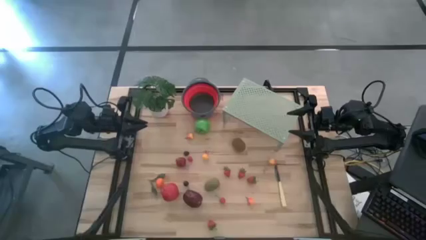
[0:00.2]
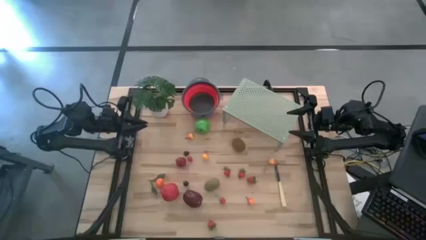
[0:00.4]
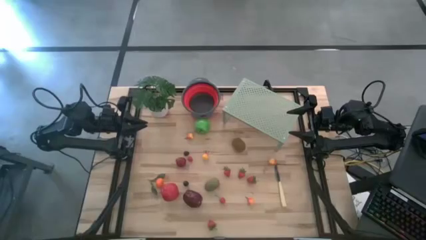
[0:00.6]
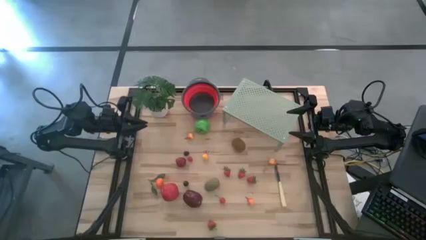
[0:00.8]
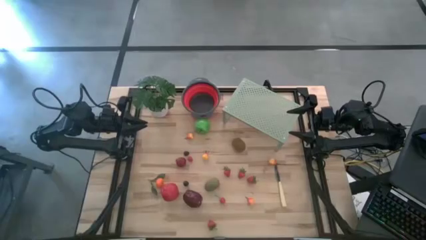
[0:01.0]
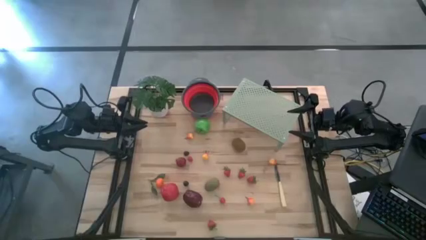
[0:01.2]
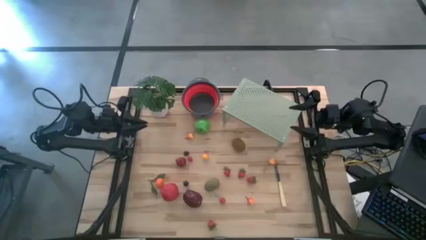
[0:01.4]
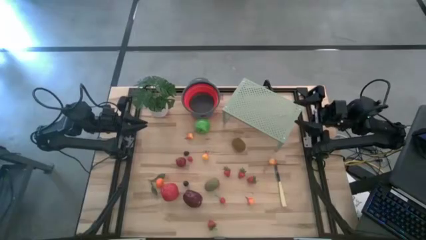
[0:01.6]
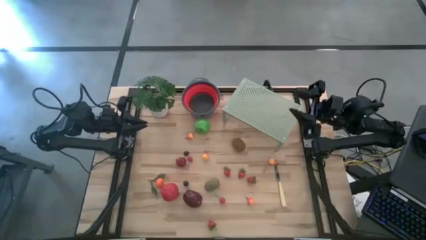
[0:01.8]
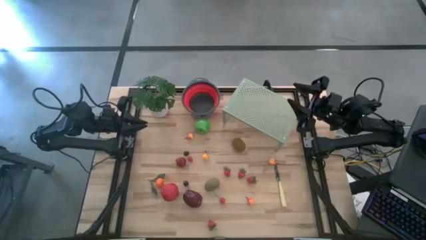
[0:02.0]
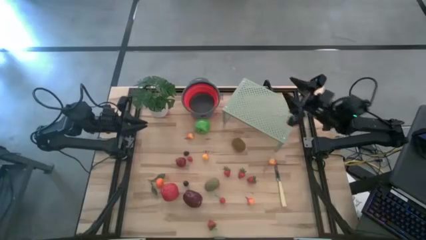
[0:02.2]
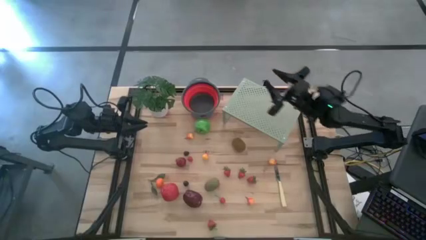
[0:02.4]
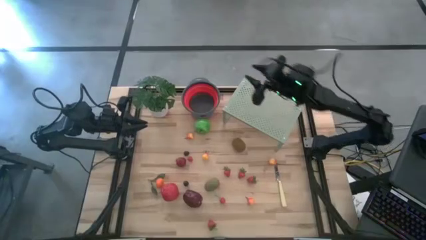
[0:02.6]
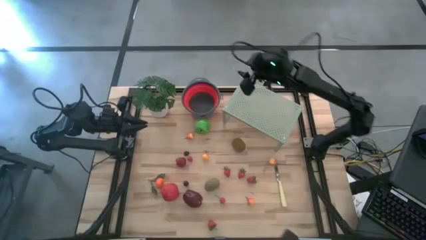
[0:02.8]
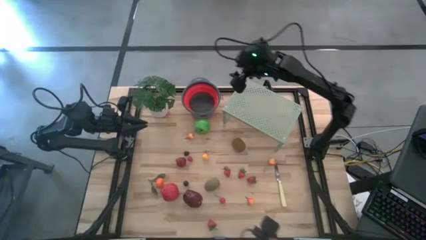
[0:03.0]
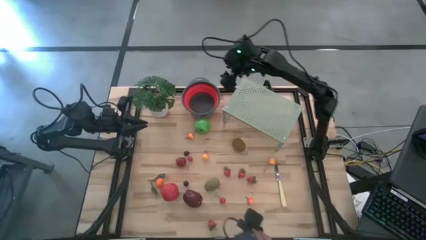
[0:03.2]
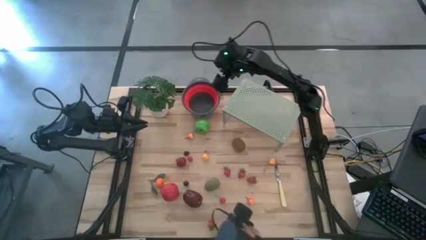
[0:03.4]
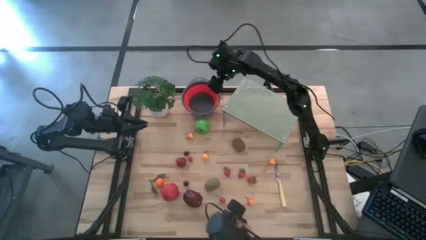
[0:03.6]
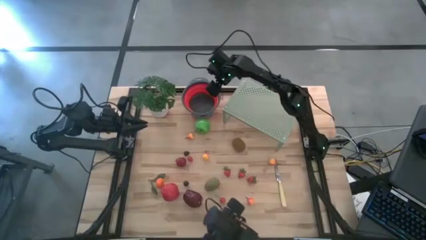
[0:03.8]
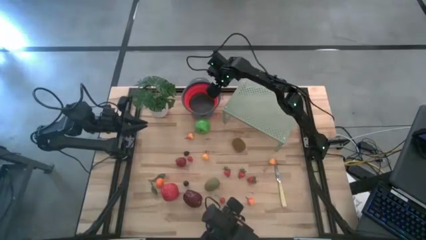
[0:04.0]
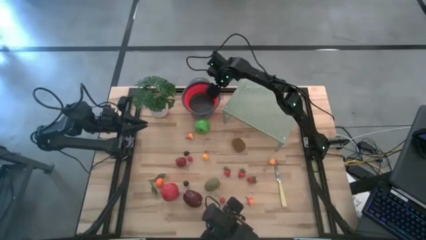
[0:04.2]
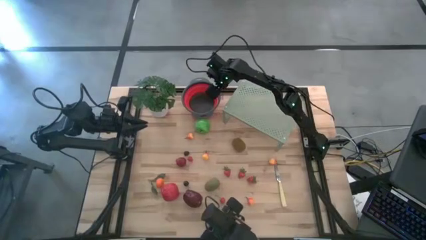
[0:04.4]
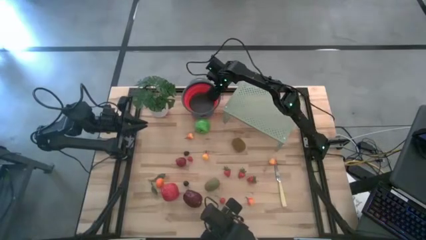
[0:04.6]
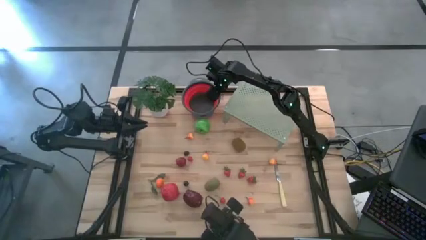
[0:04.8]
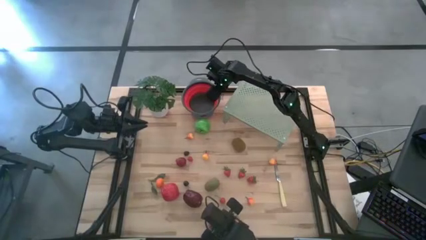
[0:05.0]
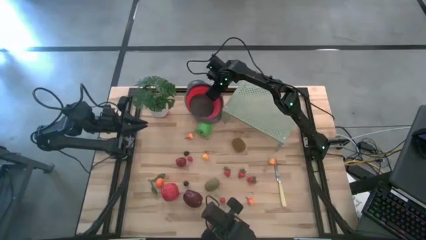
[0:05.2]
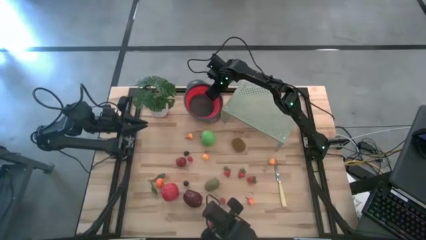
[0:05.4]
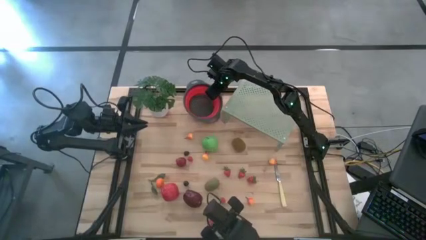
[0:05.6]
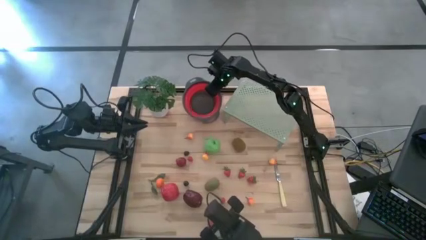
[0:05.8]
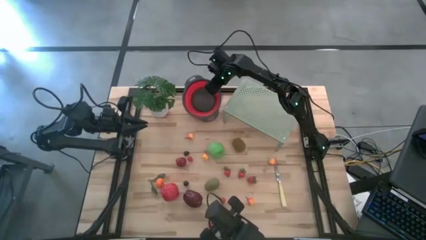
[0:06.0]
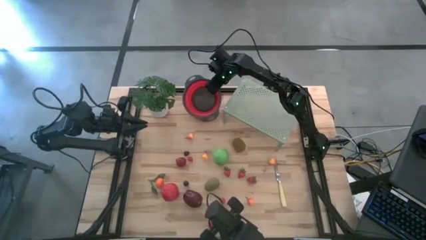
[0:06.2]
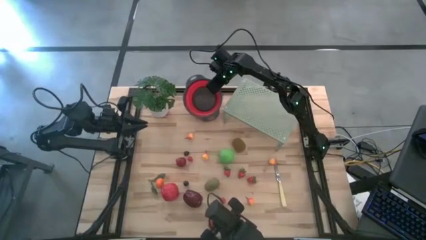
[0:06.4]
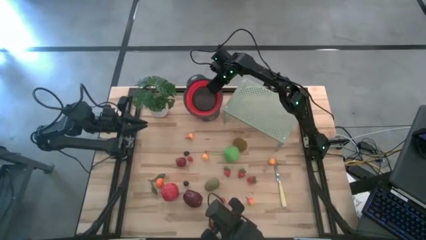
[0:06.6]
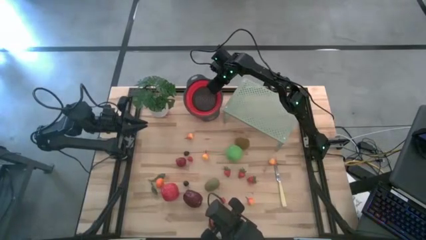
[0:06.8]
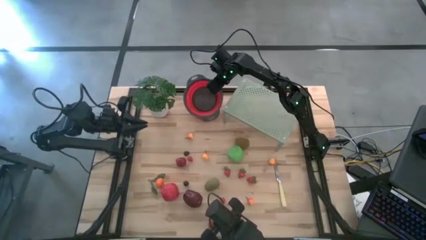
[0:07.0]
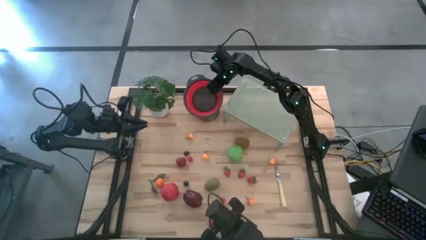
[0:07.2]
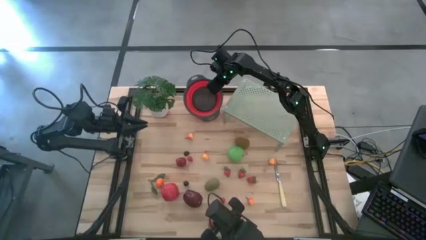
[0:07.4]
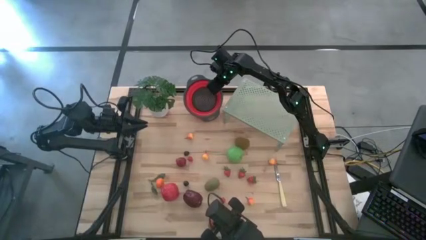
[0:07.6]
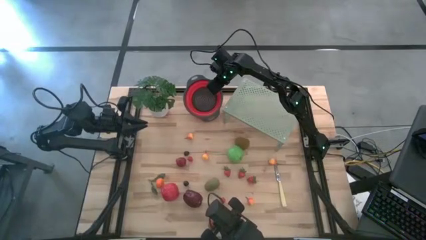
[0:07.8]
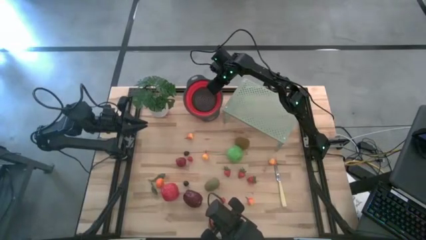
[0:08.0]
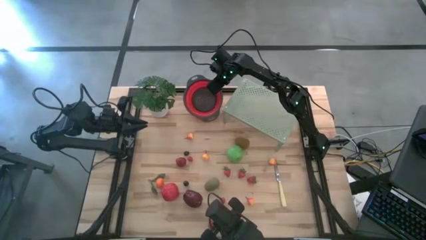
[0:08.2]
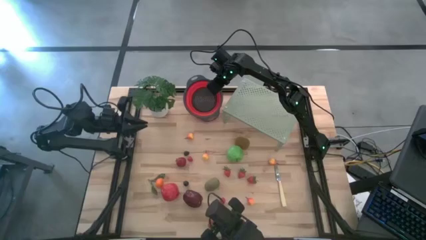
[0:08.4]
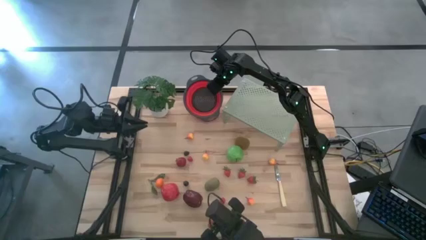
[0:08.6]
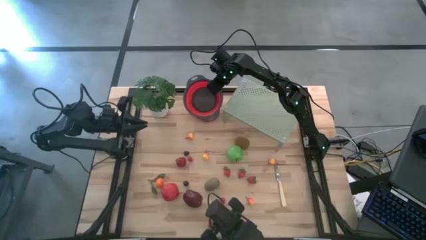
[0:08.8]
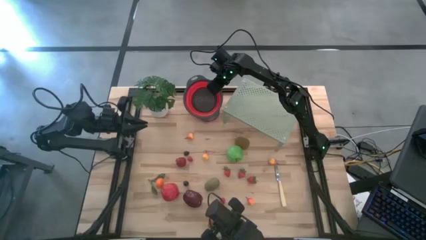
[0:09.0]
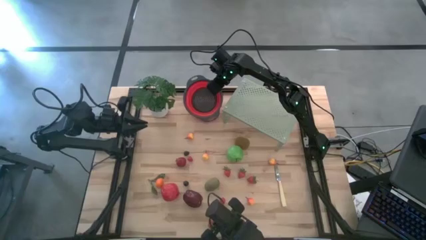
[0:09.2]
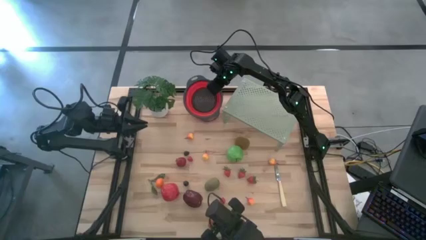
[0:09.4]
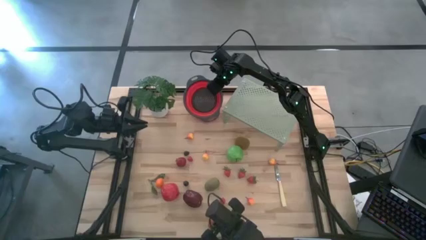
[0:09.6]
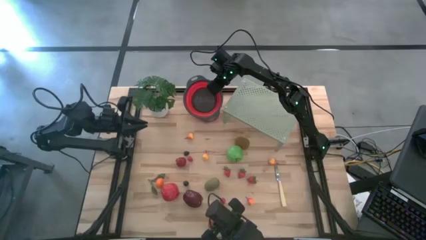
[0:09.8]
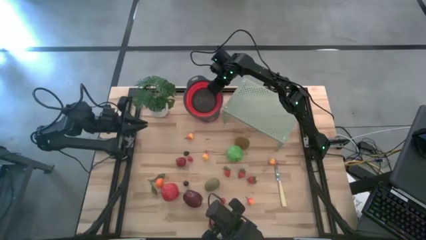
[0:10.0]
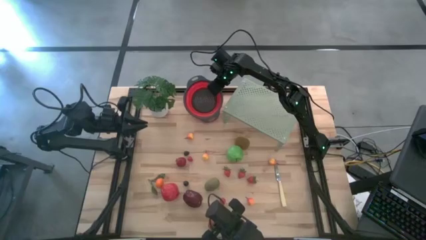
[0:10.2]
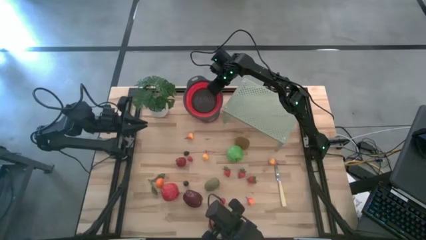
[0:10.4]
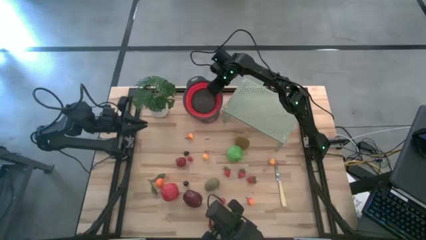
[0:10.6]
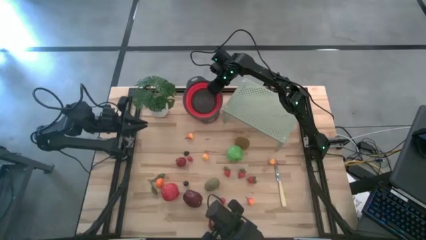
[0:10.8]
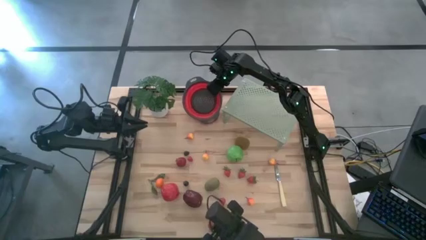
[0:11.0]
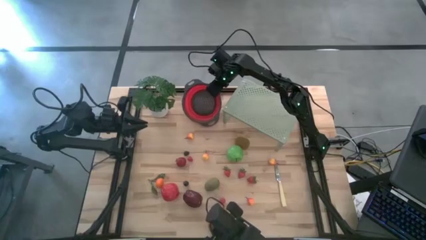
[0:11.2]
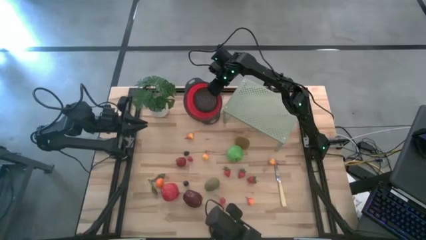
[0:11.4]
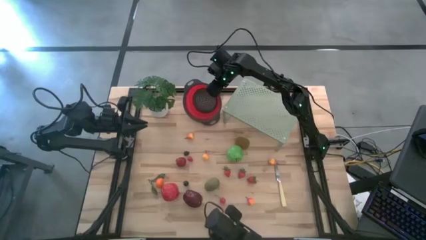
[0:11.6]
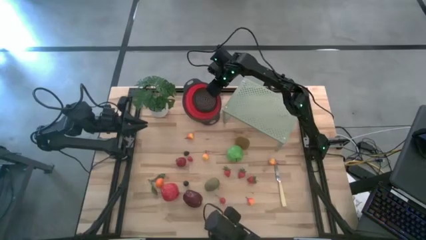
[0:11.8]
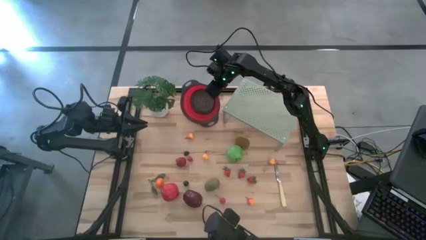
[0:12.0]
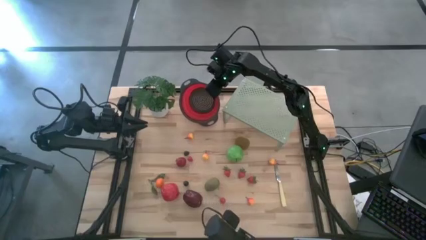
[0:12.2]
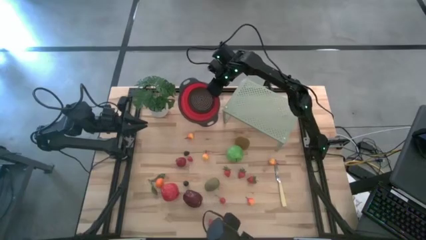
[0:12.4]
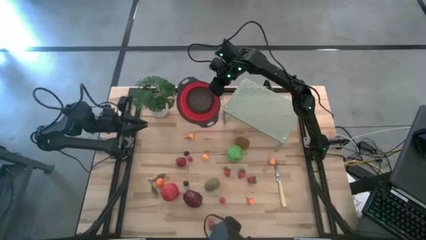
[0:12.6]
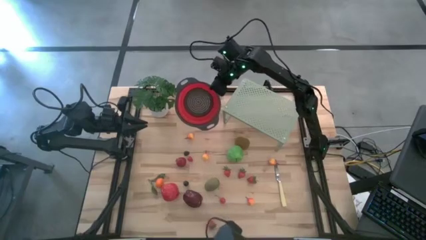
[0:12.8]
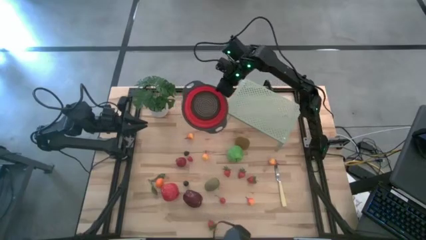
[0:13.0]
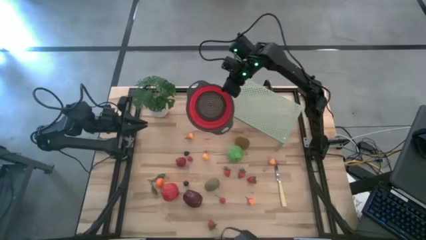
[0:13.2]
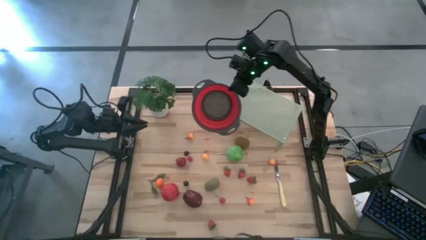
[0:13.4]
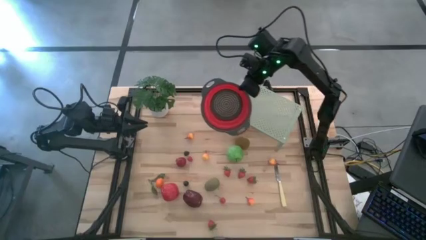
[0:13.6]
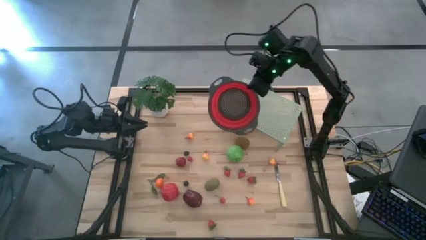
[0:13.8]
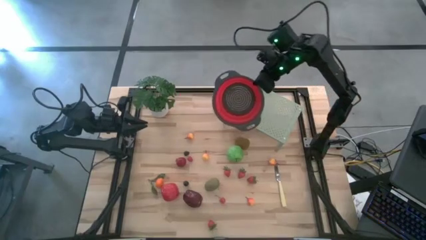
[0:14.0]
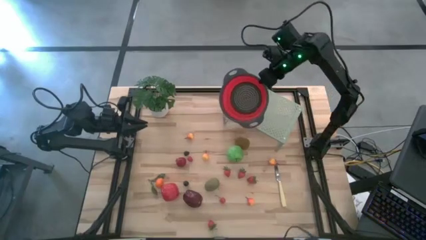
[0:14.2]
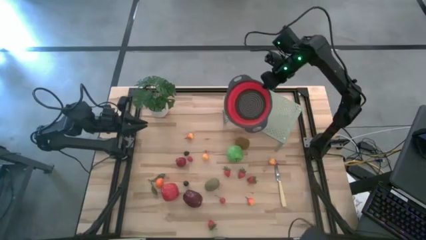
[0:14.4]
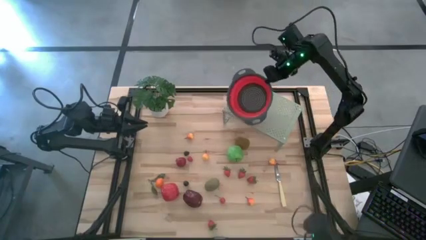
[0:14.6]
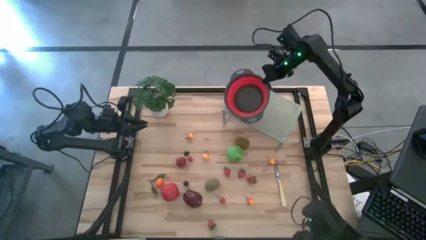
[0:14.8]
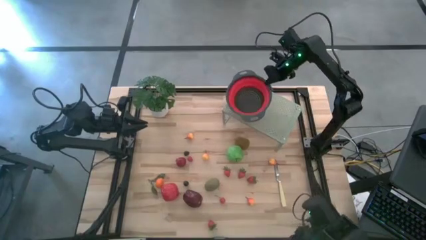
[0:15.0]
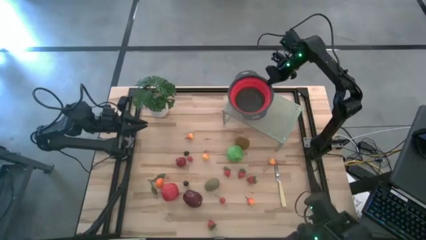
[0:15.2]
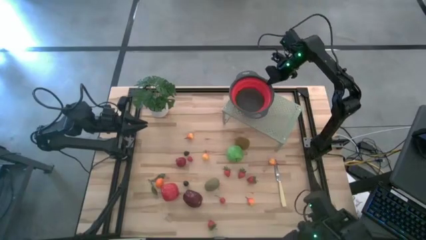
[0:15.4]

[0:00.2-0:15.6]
Task: Pick & Place Fruit
Put the red strainer bowl on the shelf
